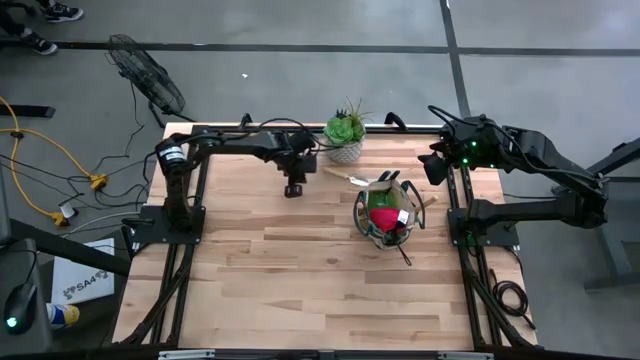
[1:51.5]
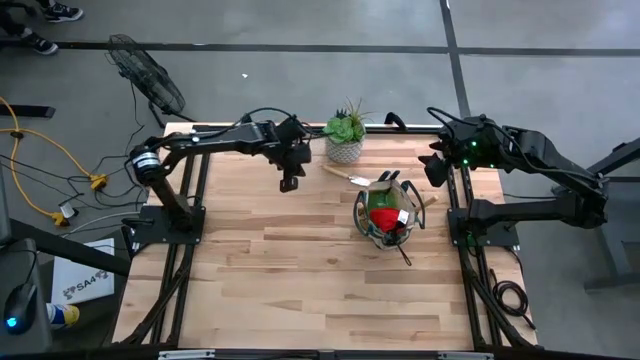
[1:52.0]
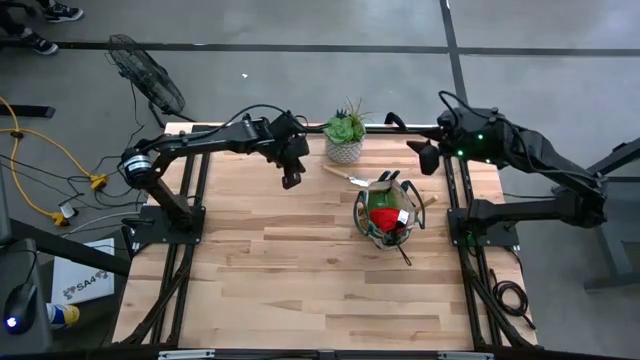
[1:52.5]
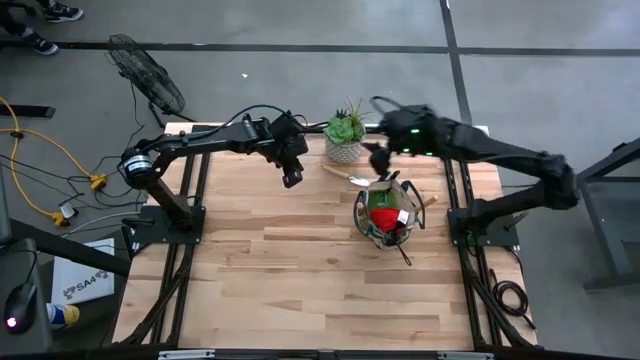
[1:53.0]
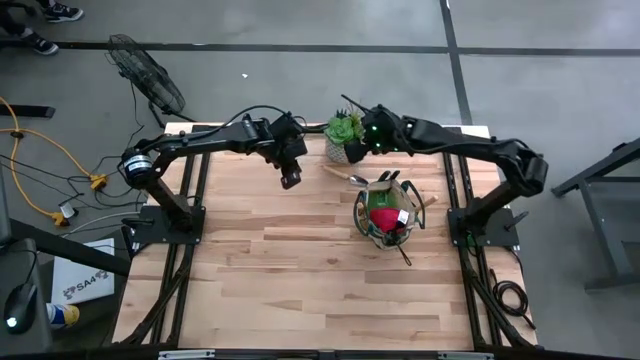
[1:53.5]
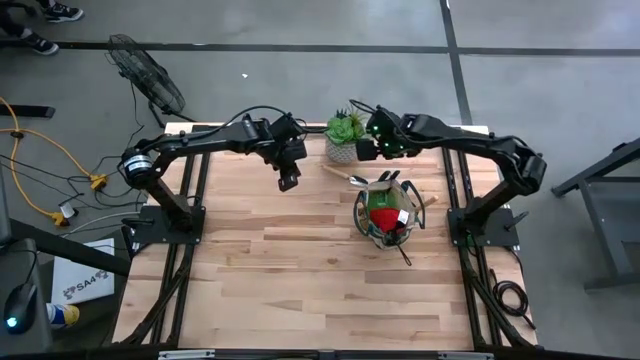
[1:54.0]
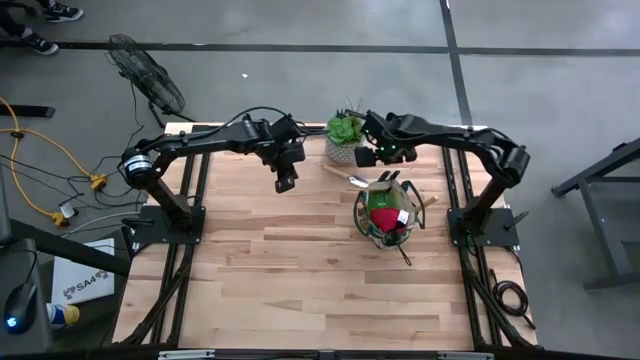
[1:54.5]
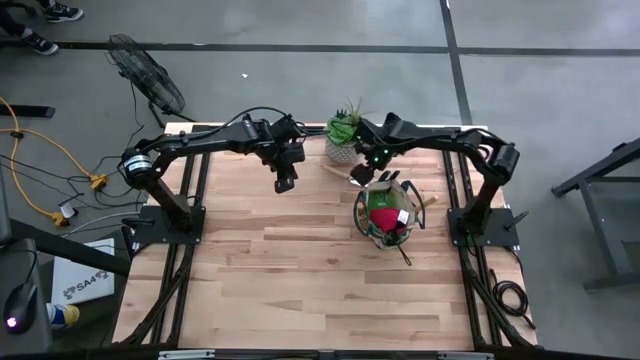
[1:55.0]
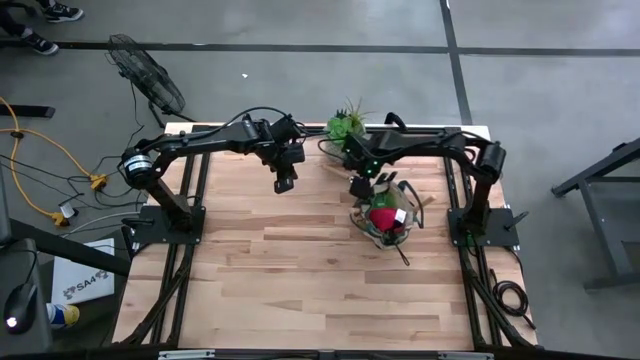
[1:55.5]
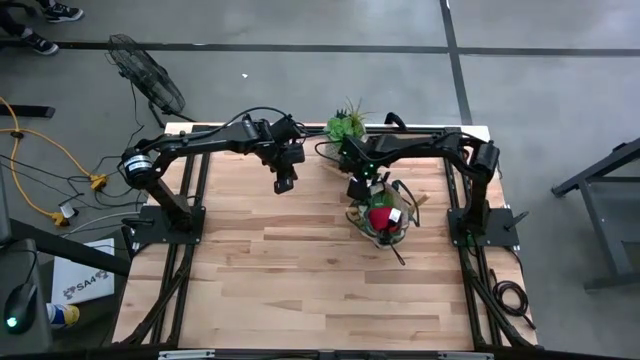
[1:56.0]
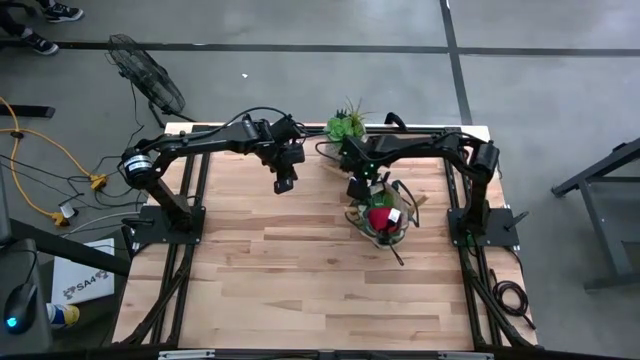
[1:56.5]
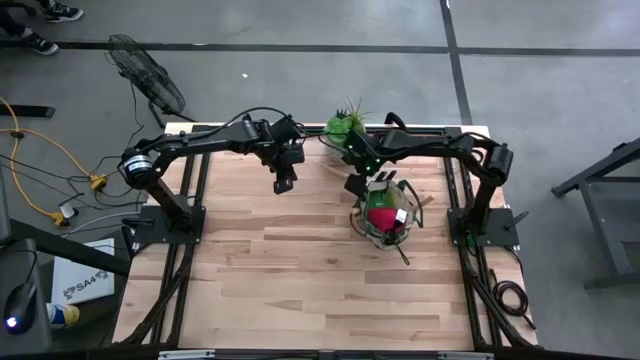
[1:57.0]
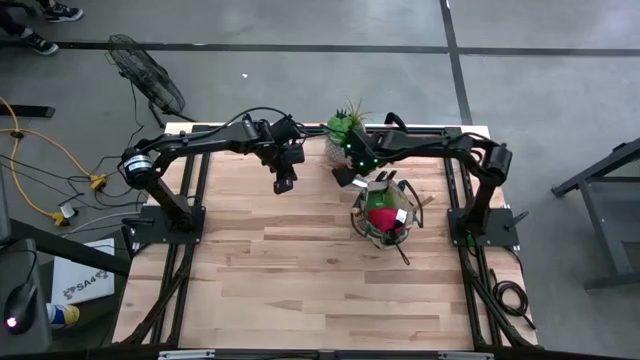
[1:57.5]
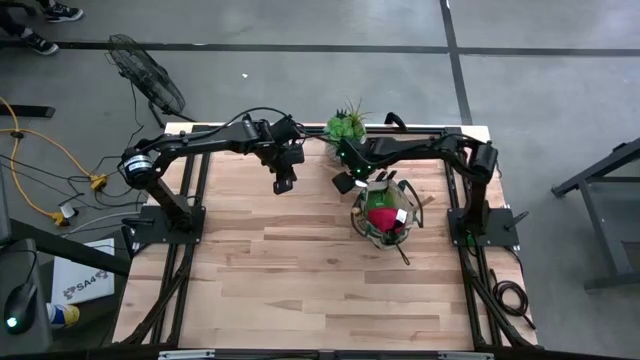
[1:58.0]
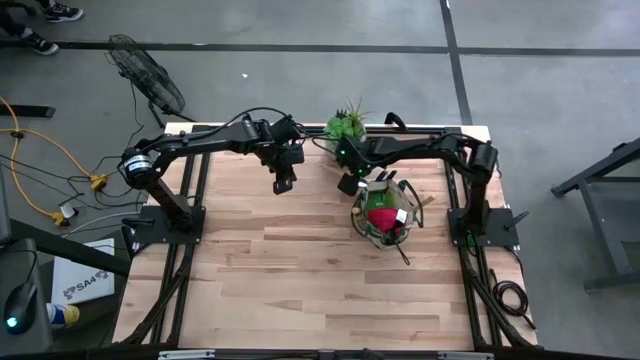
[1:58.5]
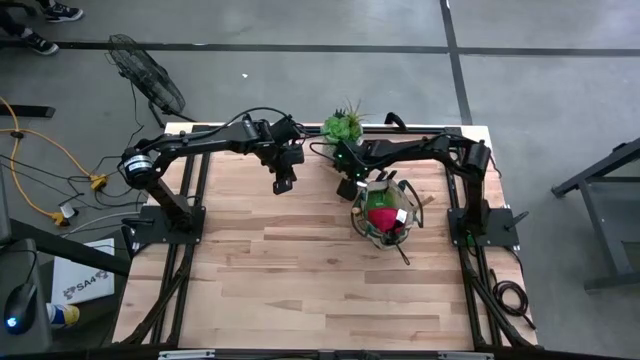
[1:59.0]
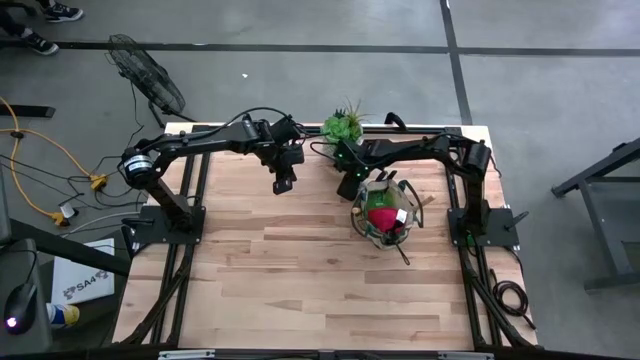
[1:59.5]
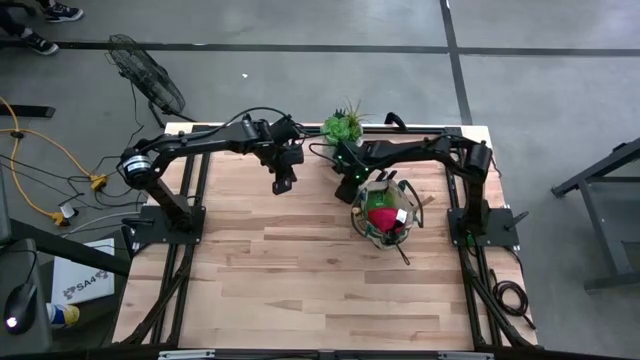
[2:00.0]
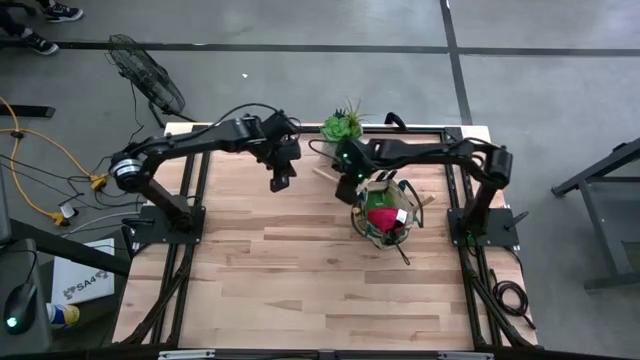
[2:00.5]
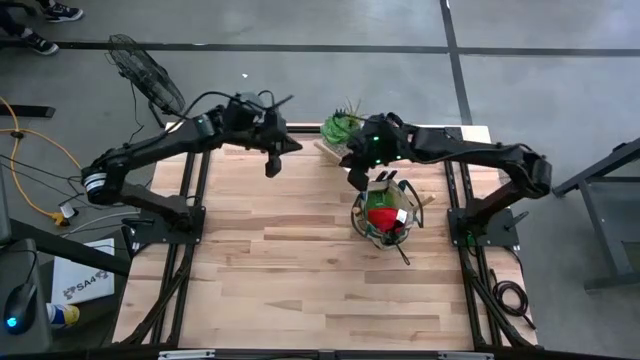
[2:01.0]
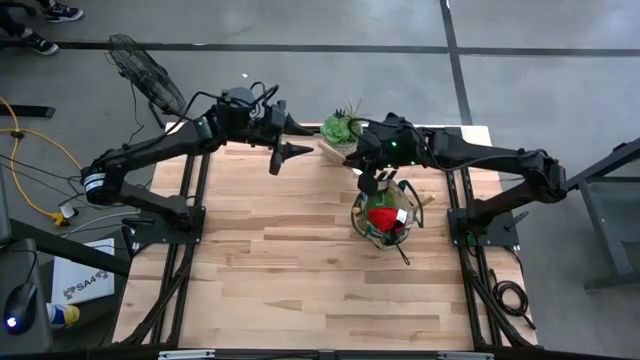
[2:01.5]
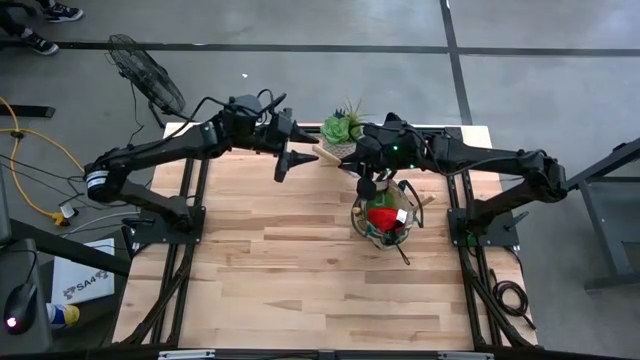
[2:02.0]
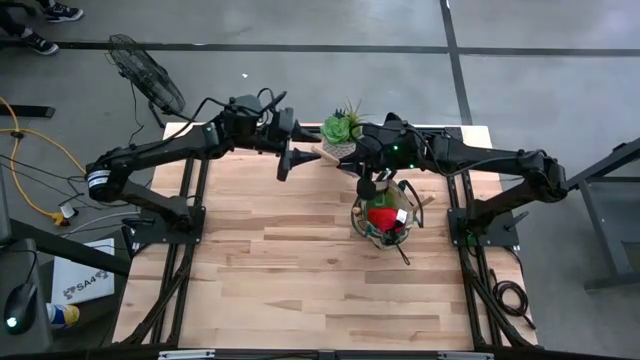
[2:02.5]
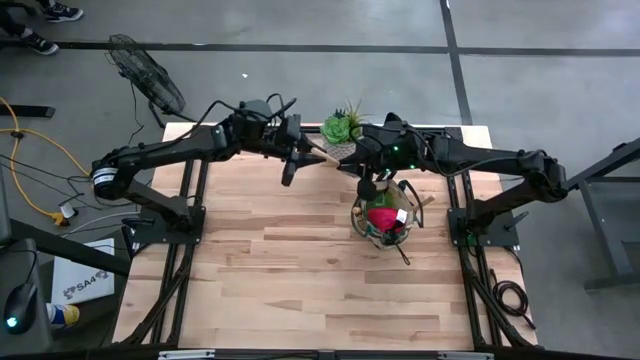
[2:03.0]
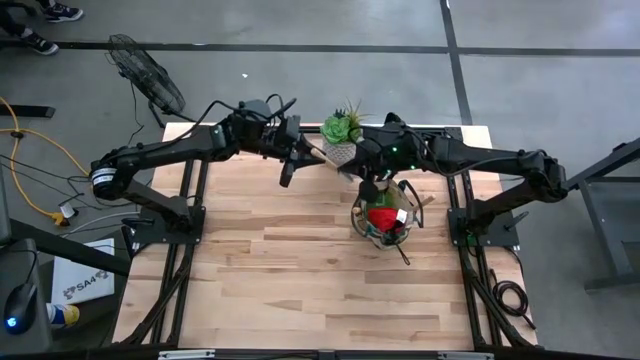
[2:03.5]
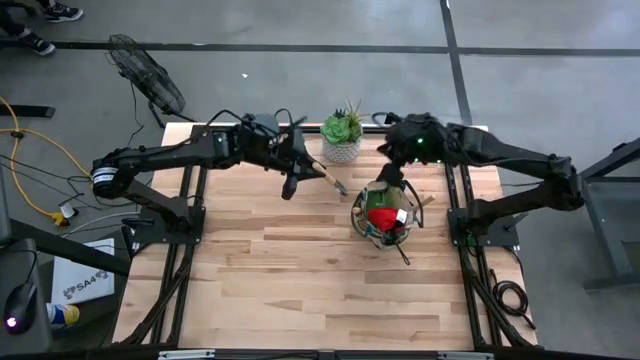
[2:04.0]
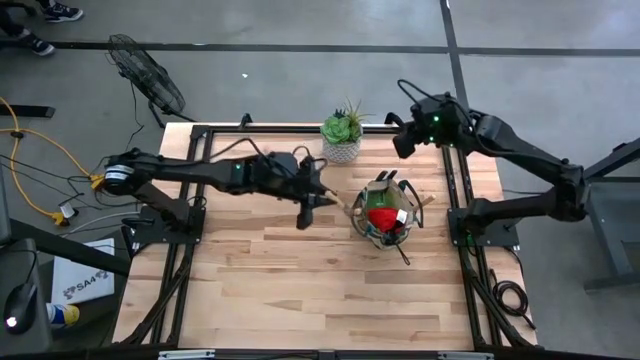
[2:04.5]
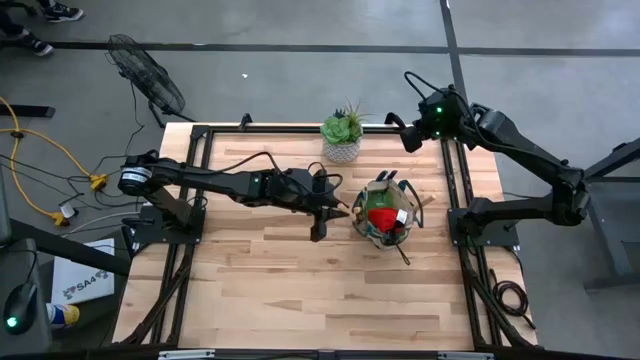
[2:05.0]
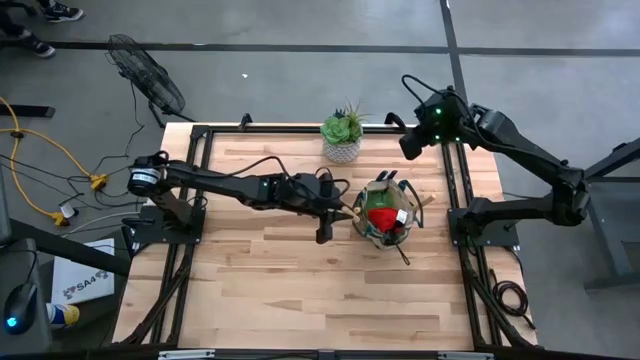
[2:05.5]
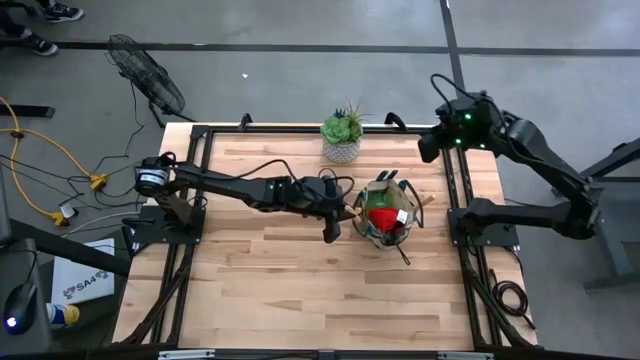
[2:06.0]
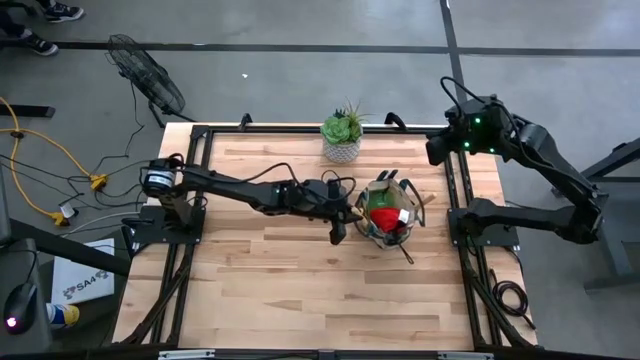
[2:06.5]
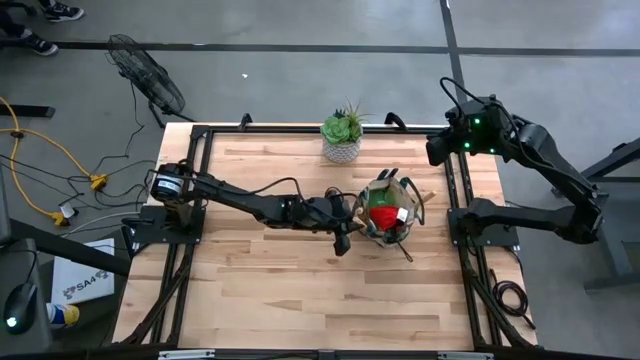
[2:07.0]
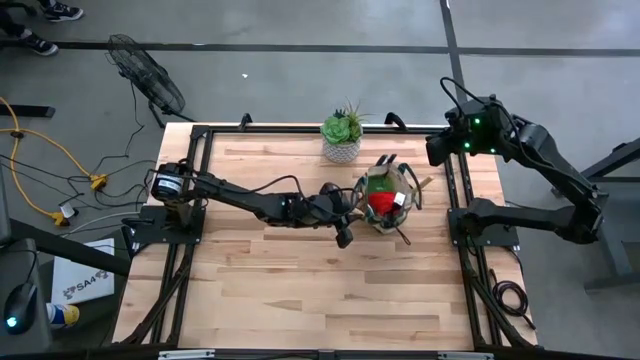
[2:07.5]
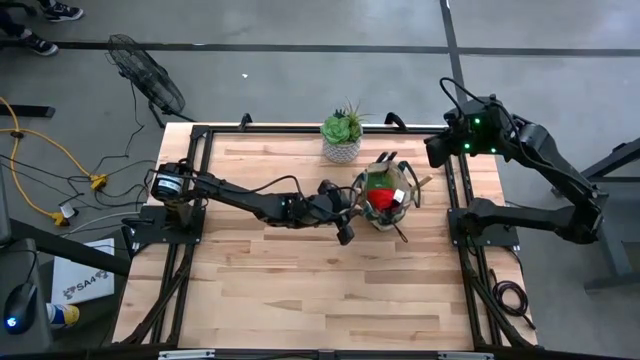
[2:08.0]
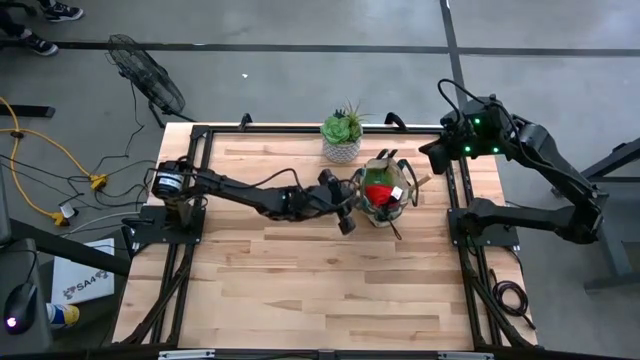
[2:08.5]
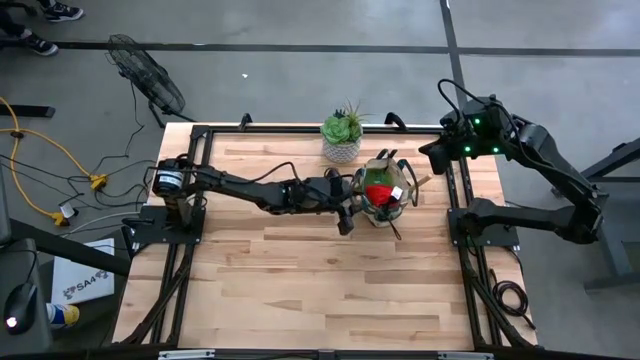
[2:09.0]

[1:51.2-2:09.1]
Task: Pick & Place Garden tools in Gardening bag
Put the brown trowel into the brown gardening bag

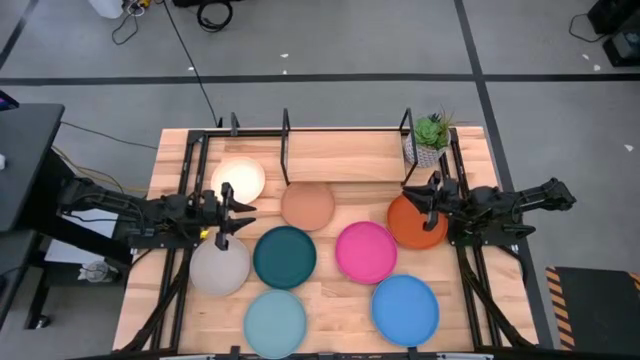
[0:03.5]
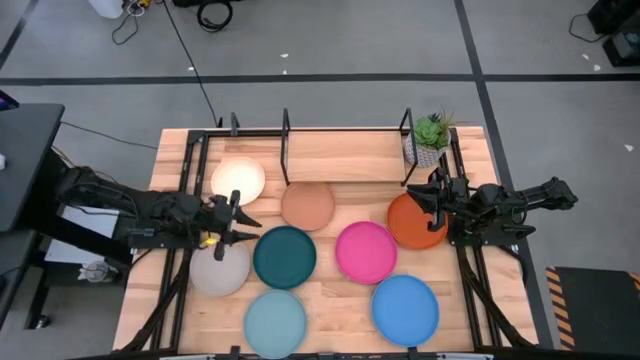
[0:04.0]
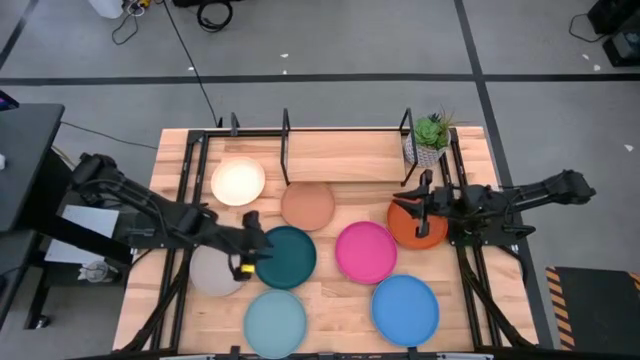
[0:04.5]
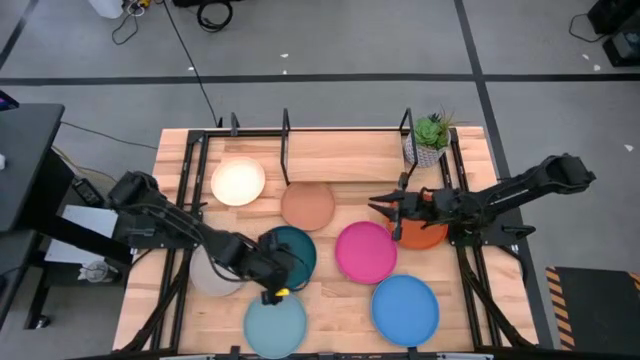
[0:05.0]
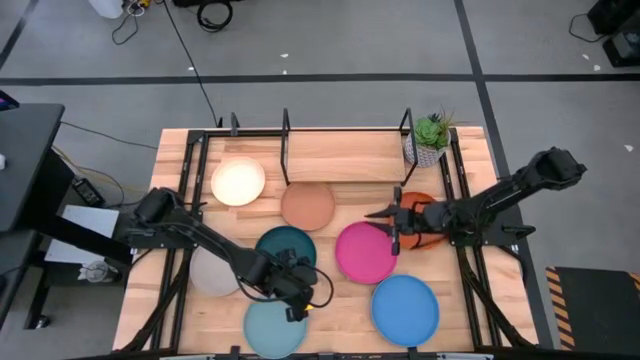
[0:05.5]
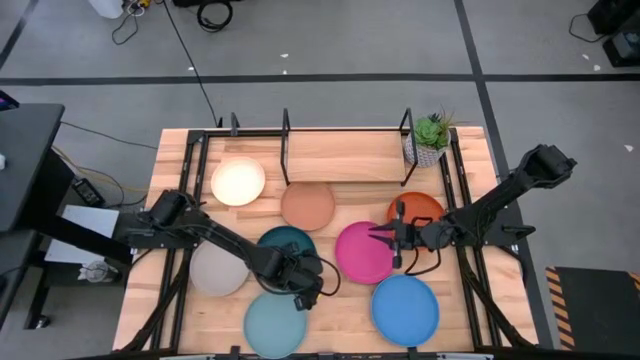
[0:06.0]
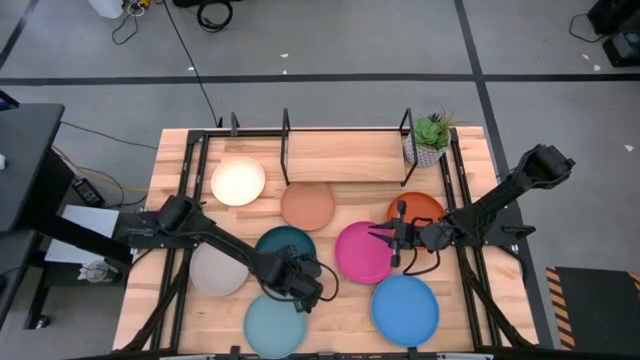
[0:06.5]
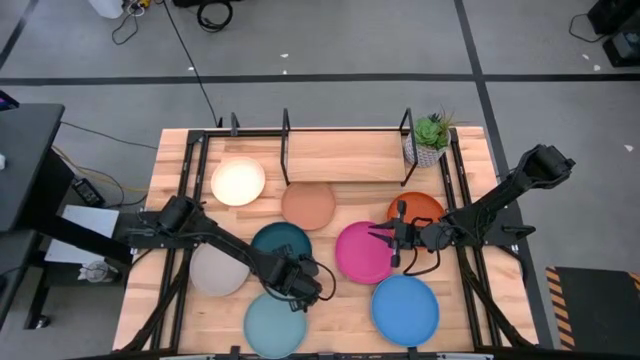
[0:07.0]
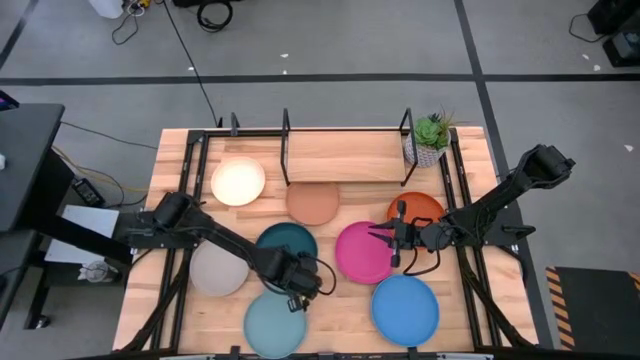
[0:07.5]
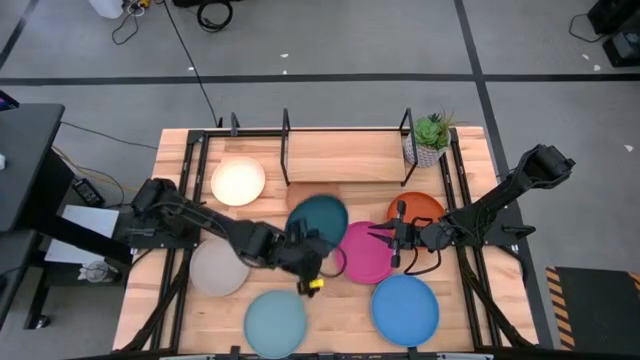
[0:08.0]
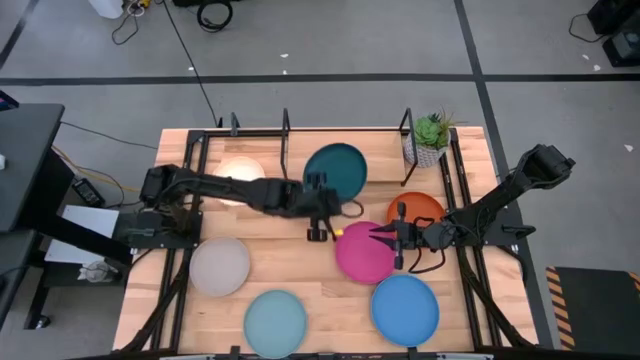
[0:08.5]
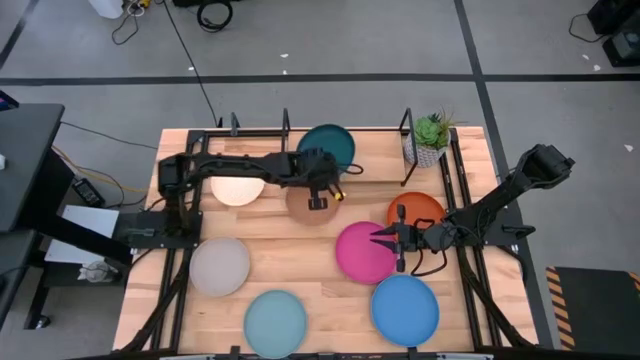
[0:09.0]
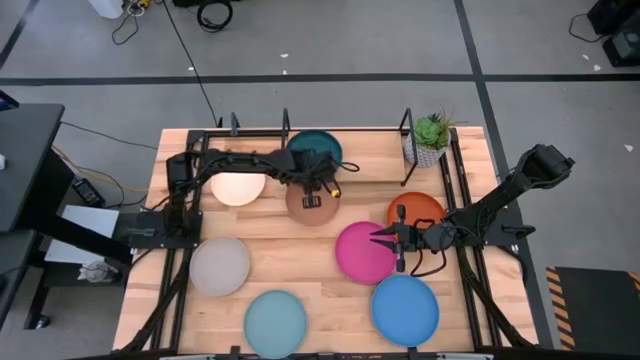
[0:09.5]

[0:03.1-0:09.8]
Task: Place and stack plates onto a shelf
Put the dark blue plate on the shelf
